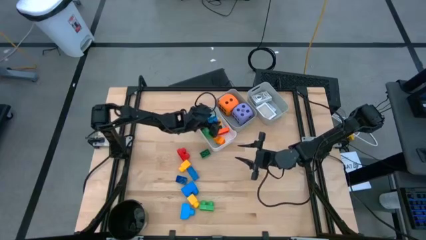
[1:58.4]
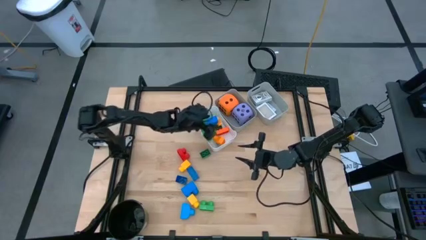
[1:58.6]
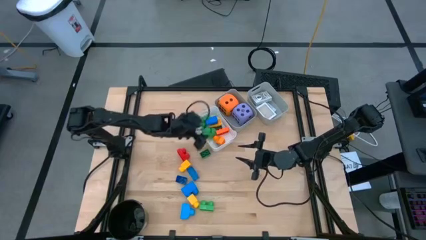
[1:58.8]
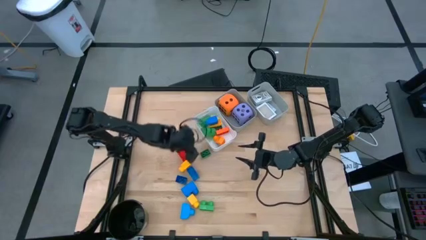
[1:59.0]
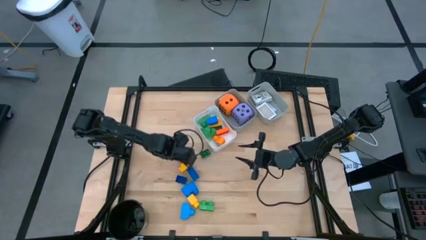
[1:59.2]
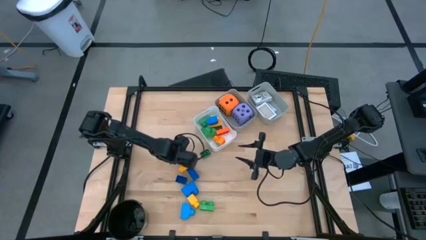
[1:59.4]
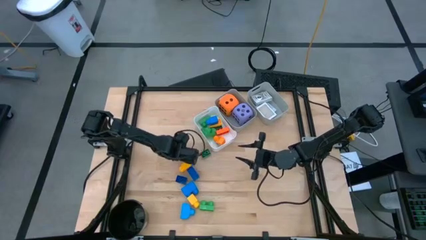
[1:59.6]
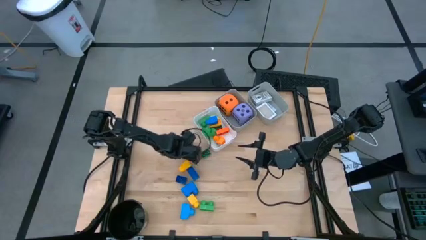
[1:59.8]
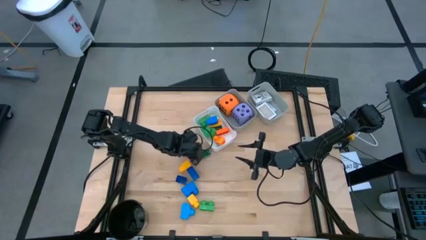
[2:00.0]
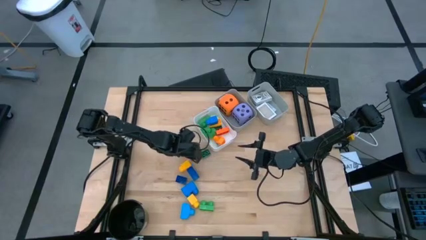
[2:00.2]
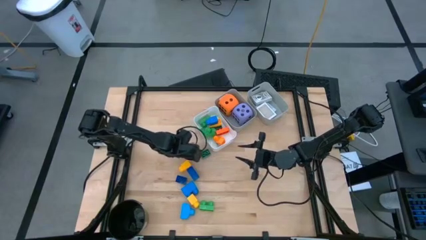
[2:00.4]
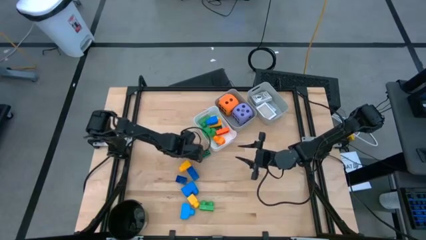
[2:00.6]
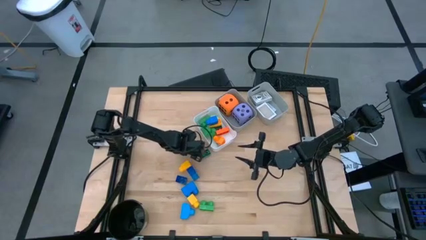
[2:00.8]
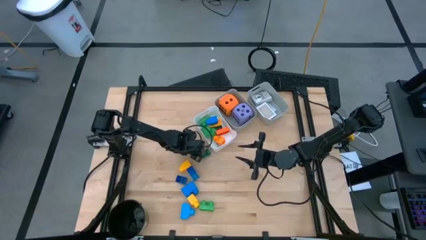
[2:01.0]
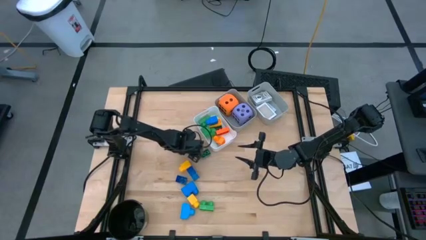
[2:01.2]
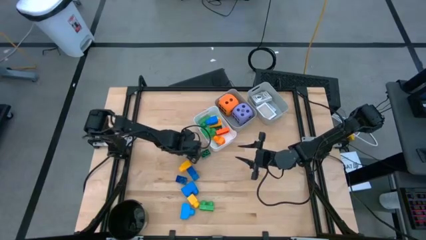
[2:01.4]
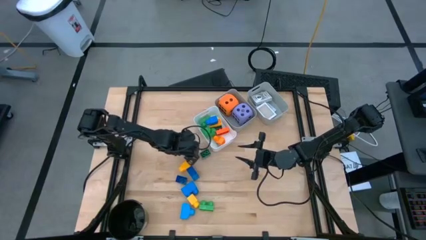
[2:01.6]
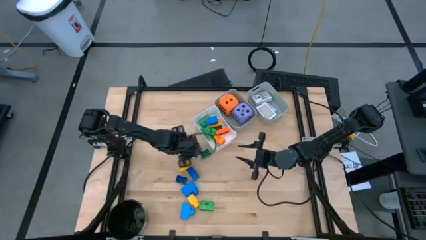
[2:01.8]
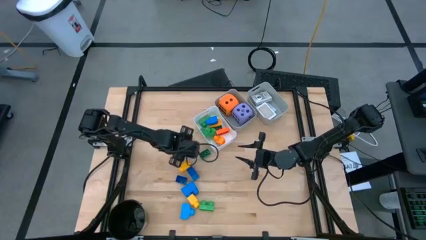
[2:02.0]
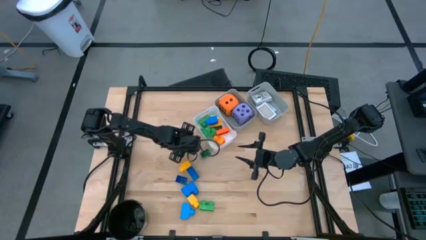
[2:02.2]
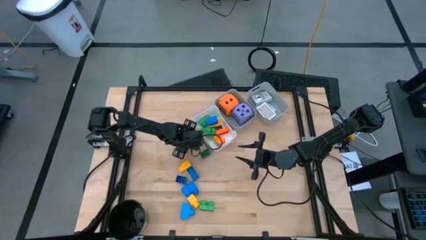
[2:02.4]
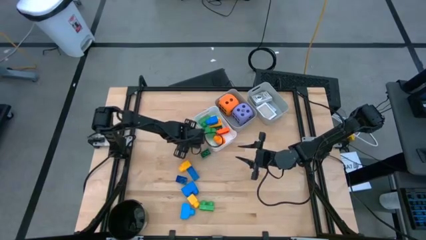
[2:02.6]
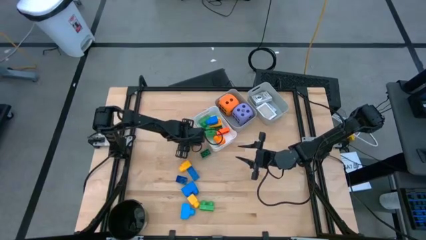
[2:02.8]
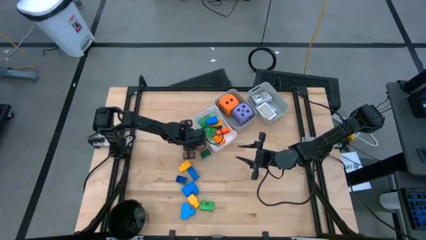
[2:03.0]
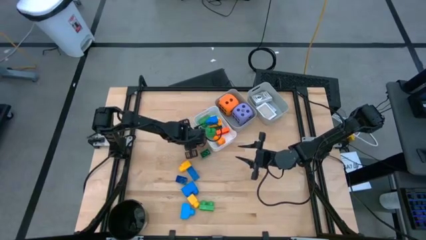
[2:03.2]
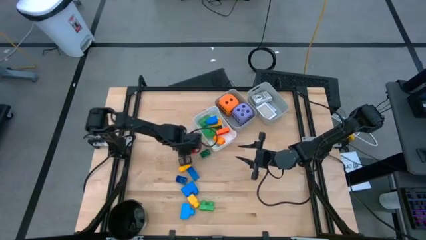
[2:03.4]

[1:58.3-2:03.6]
Task: Pick & Place Toys
Put the red game piece into the white bin

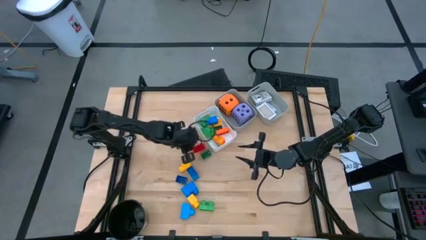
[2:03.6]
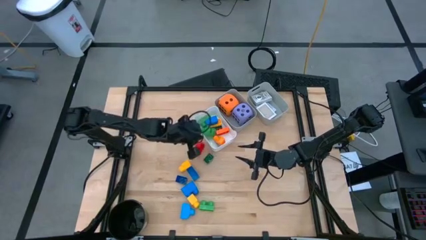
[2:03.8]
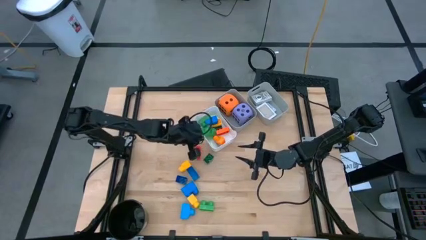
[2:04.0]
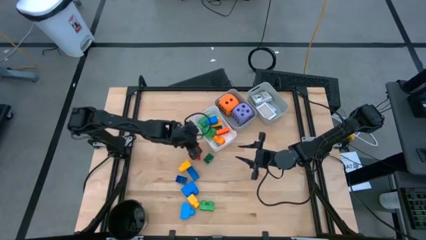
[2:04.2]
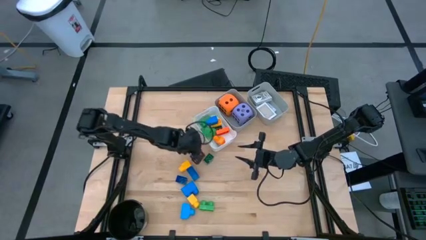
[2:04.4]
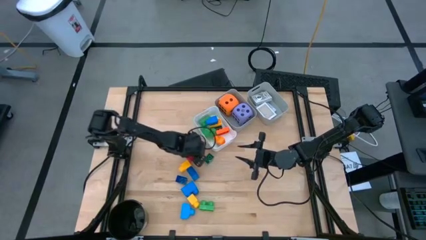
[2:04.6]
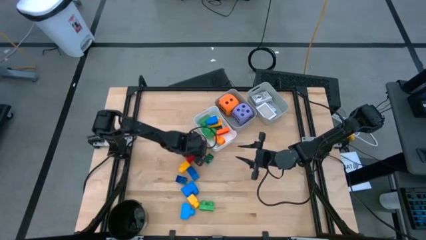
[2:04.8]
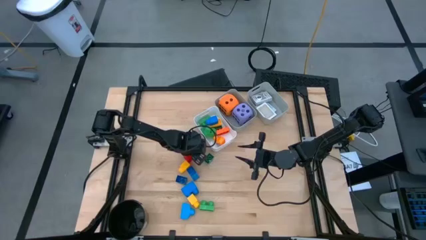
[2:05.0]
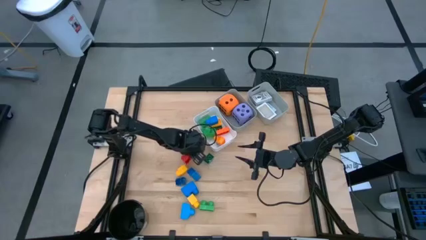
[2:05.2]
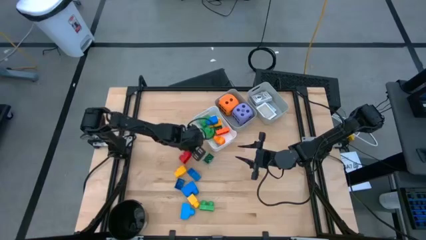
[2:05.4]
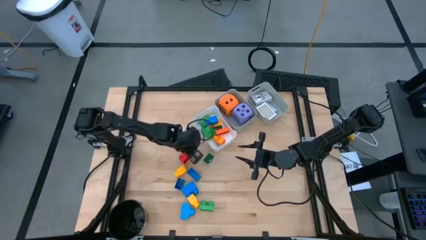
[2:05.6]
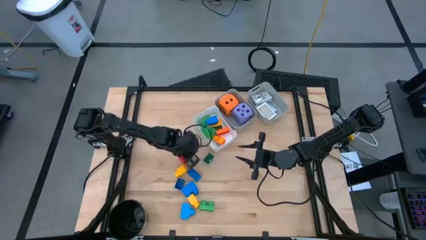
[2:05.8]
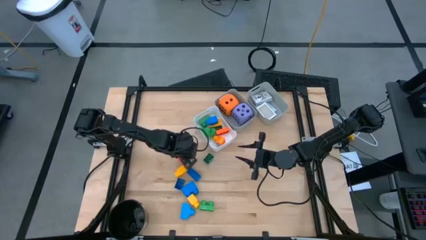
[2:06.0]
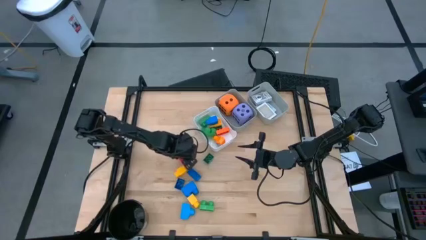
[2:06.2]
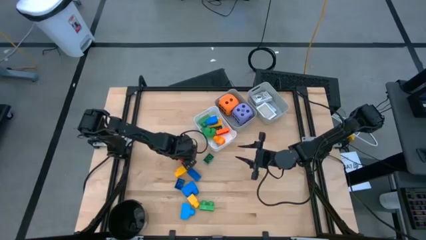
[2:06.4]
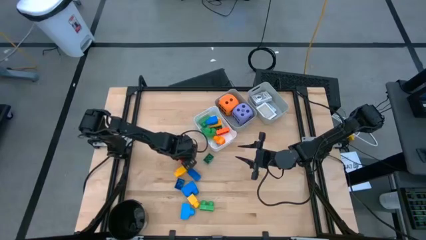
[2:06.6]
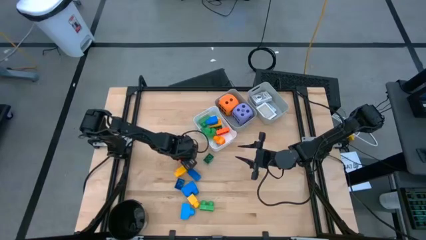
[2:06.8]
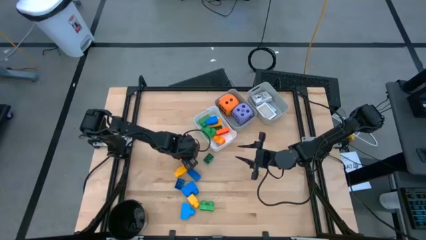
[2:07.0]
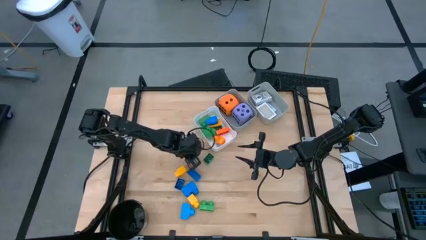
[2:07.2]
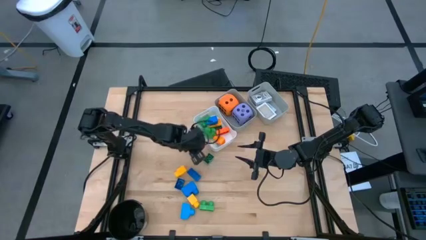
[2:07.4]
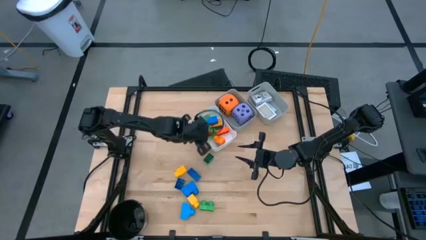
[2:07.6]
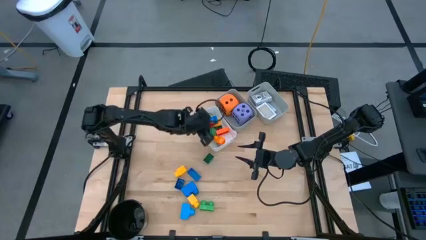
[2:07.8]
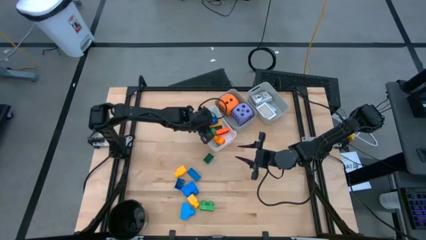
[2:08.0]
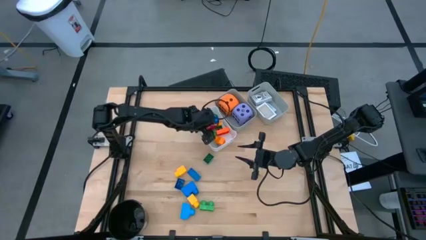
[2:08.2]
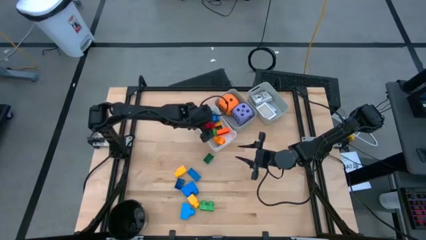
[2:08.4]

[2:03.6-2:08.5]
Put the red game piece into the white bin

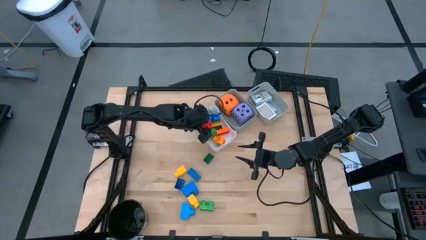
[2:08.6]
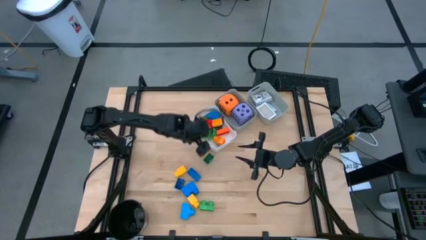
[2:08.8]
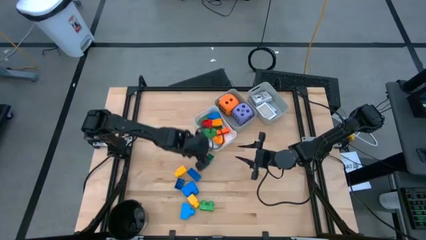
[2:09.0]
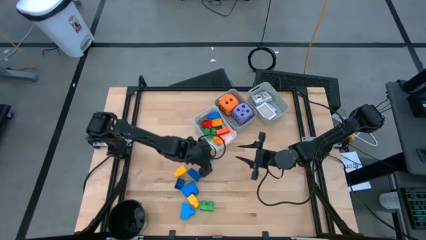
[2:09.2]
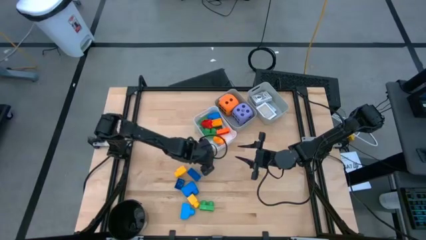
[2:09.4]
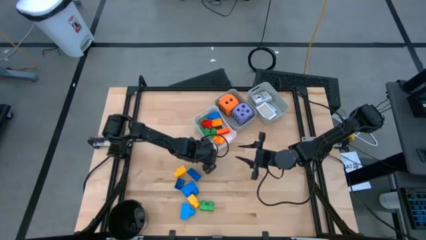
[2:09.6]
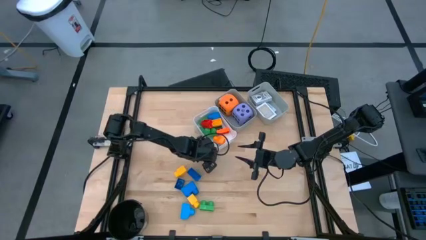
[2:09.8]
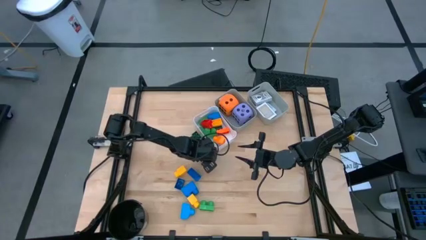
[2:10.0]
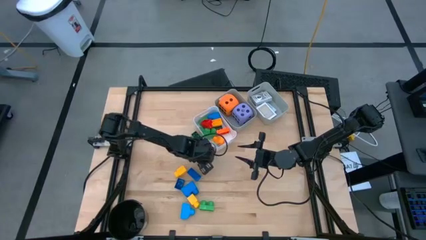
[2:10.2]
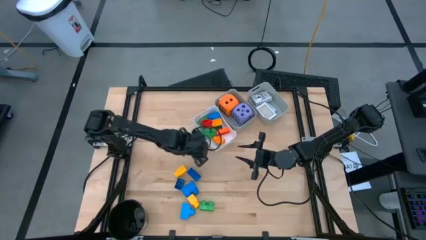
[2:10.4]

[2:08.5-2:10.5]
Put the green game piece into the white bin

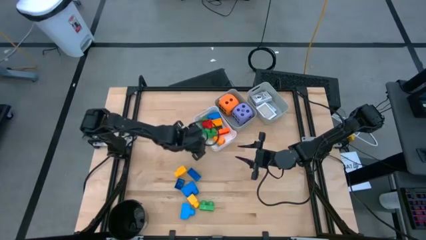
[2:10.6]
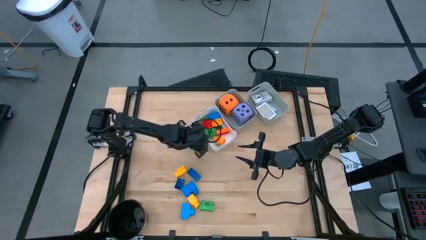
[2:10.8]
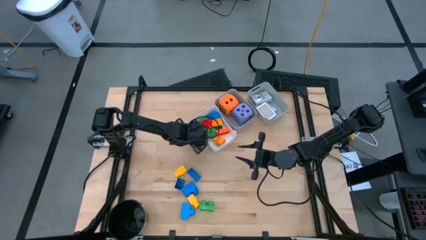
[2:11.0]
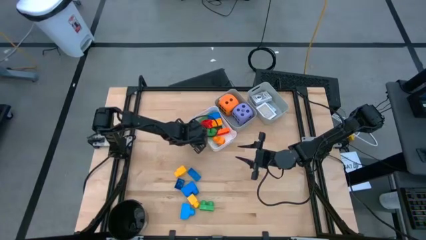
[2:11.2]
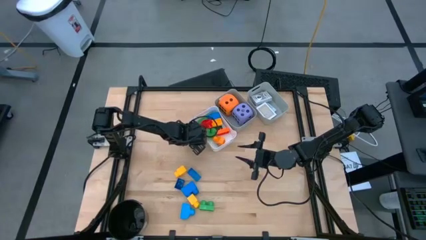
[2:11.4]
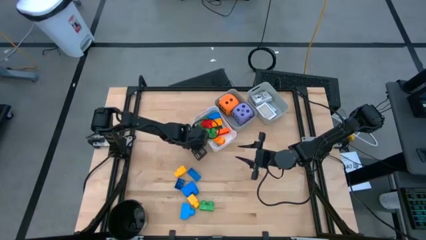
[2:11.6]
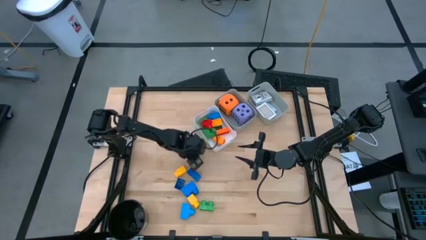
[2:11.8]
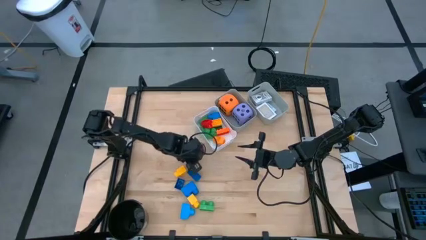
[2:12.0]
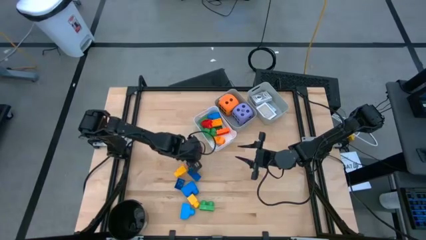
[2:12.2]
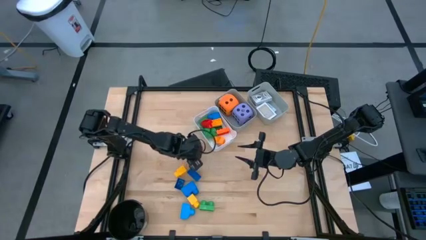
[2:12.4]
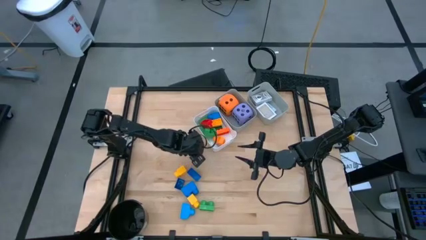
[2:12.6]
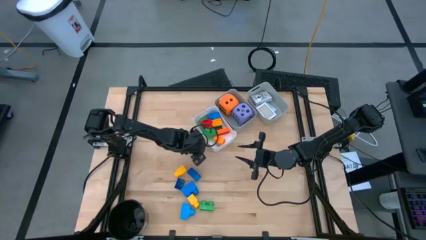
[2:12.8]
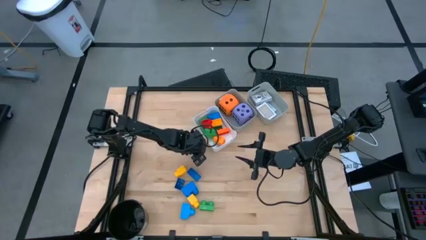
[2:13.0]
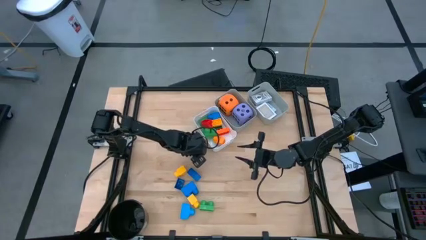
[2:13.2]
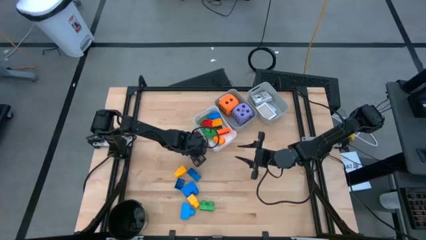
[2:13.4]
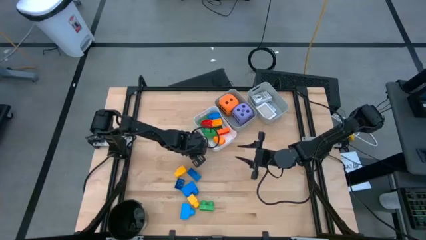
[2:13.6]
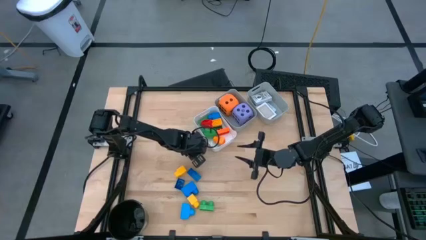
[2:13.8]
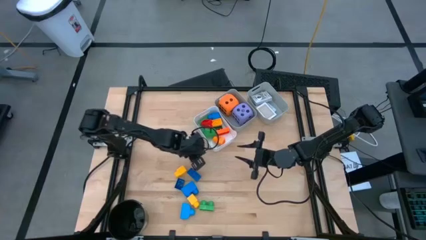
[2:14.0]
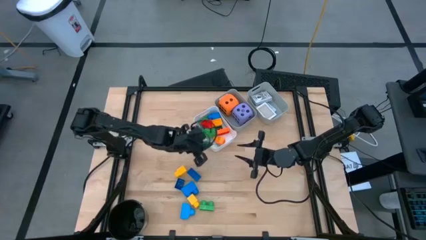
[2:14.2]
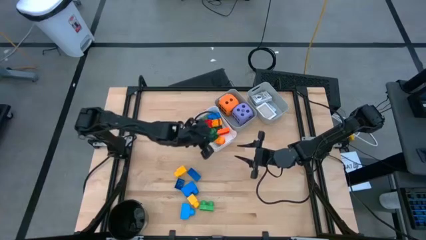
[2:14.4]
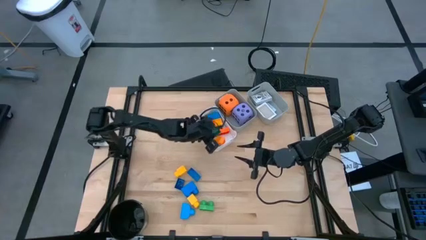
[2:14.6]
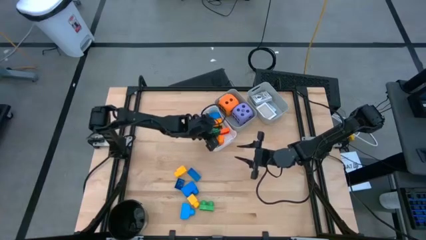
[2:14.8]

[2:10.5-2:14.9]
Put the green game piece into the white bin
